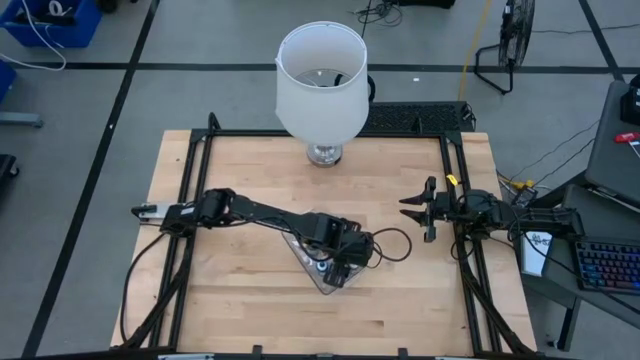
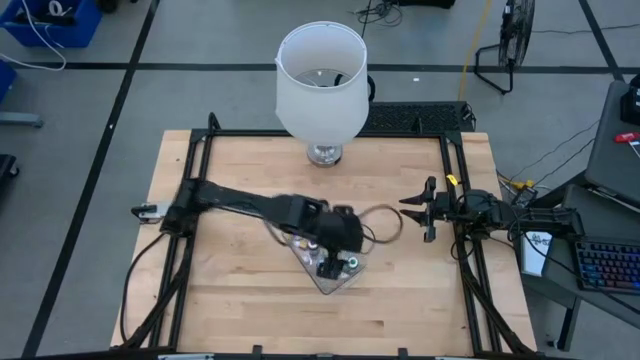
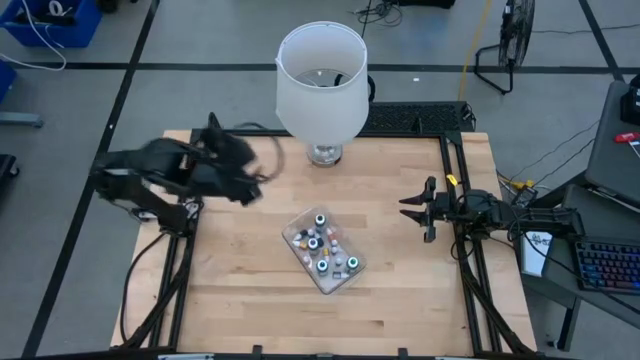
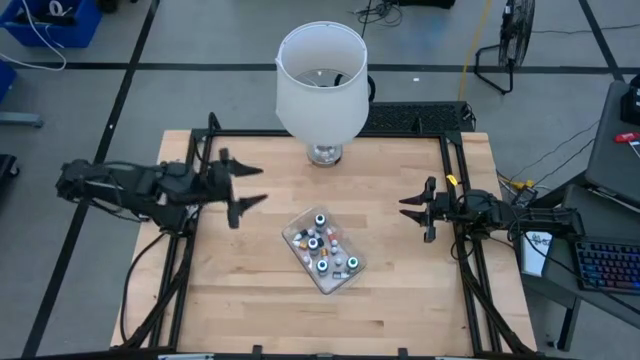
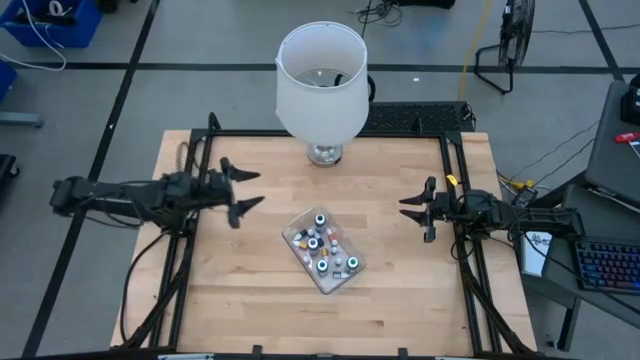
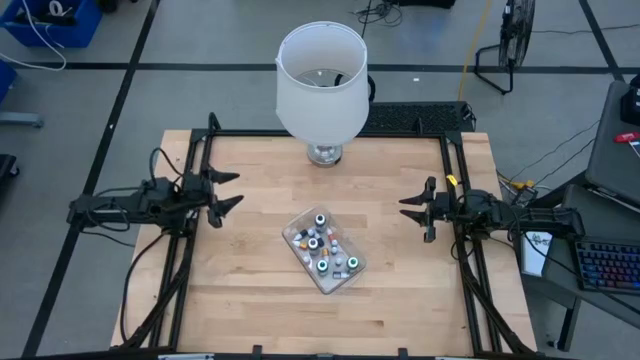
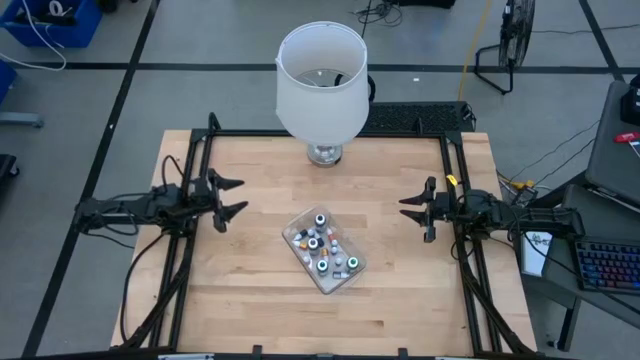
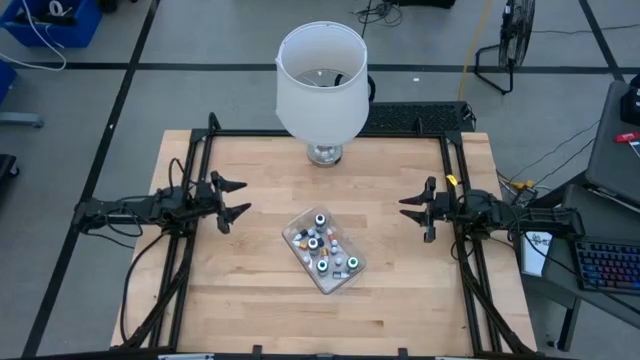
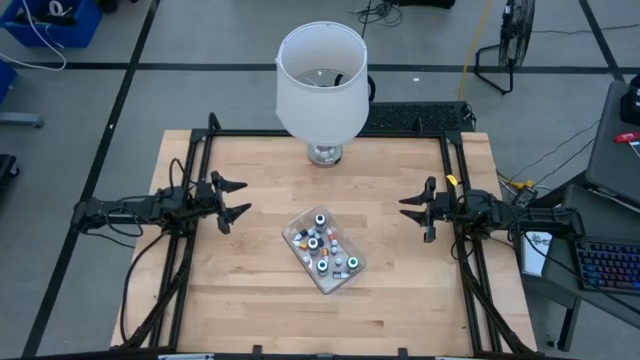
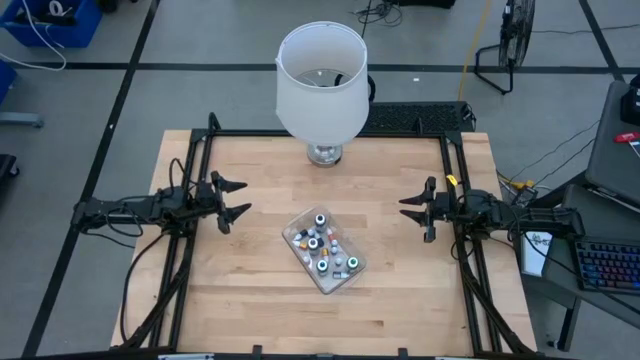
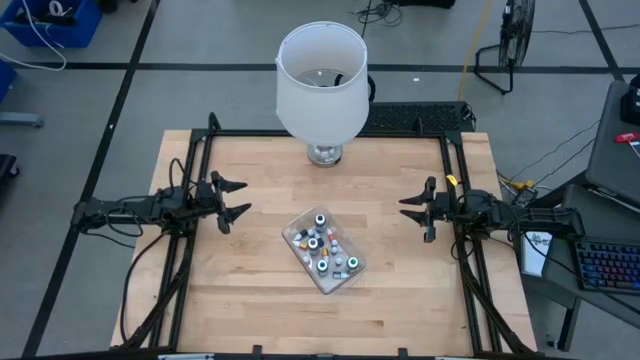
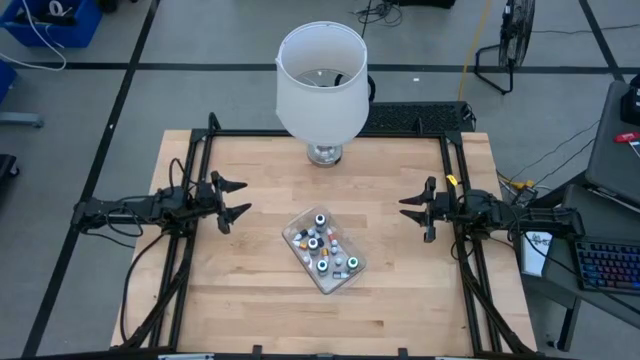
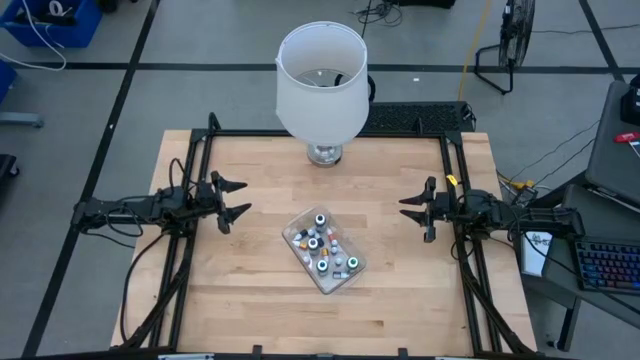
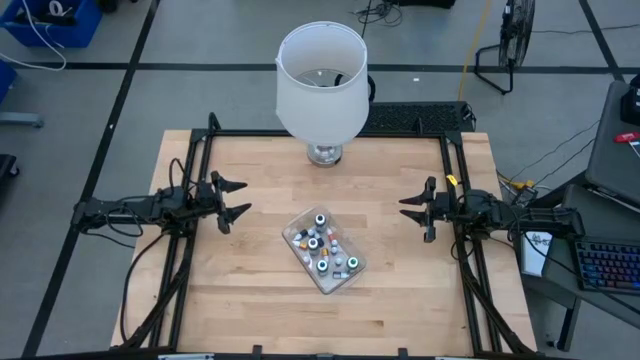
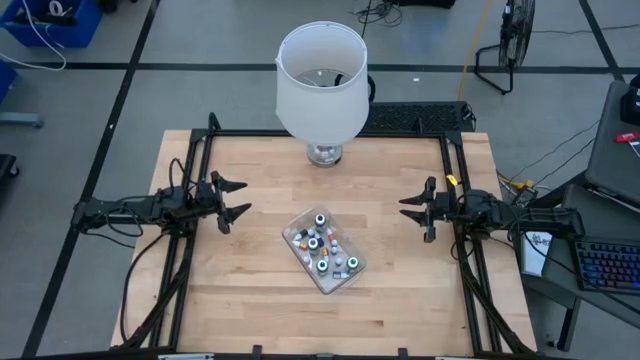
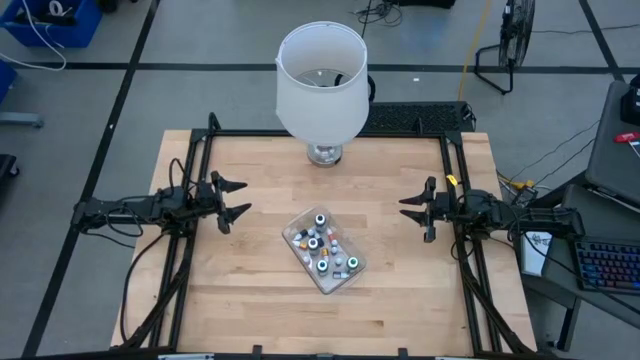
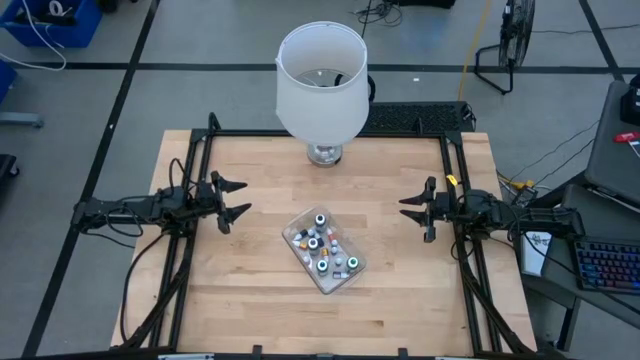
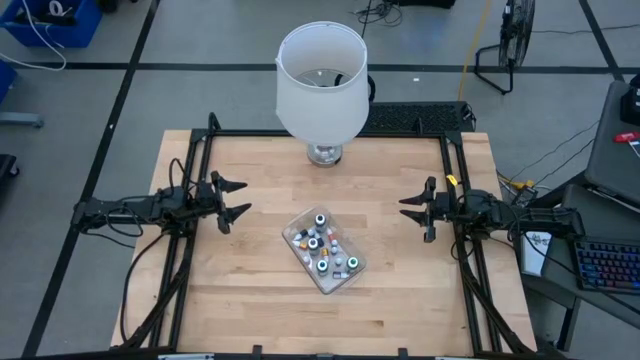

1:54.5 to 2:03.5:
Task: Pick & Place food coloring
Return to Home Position

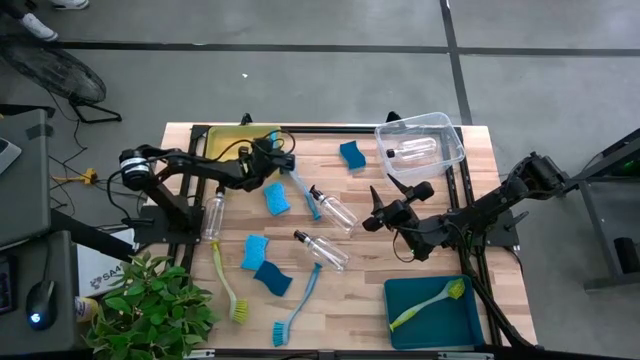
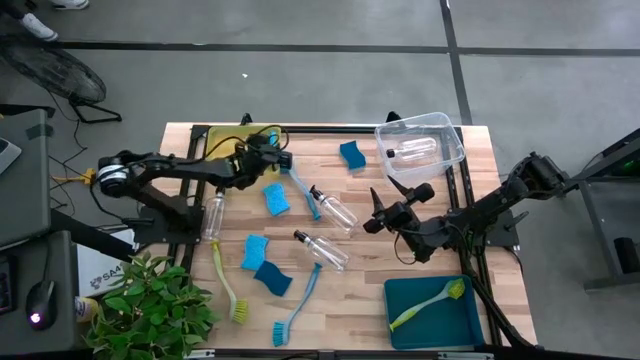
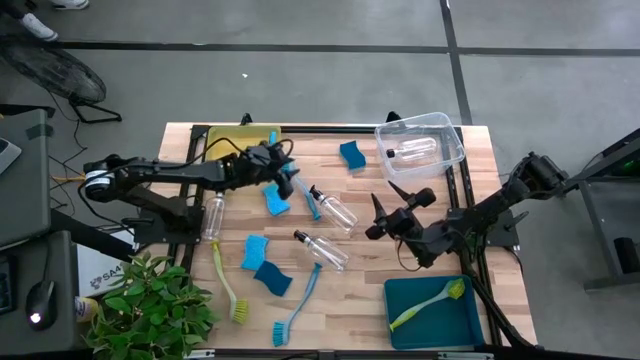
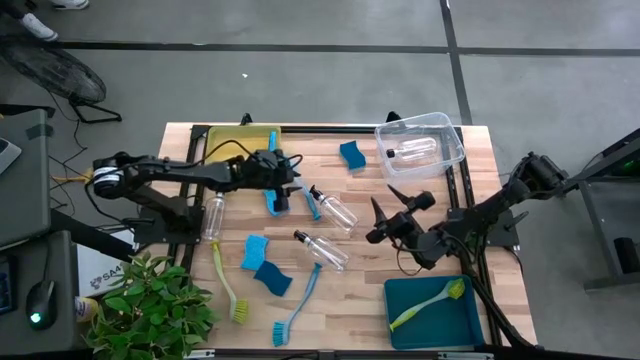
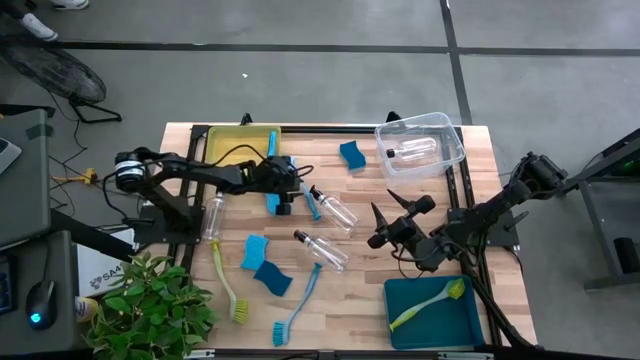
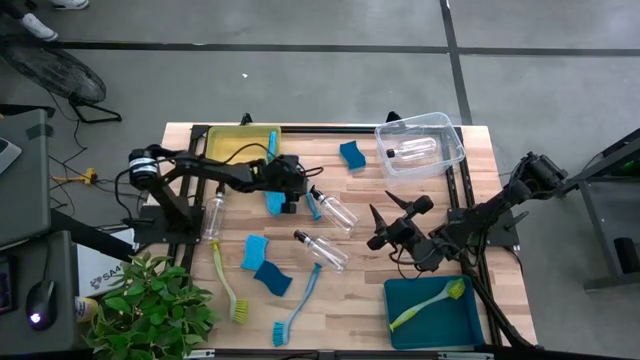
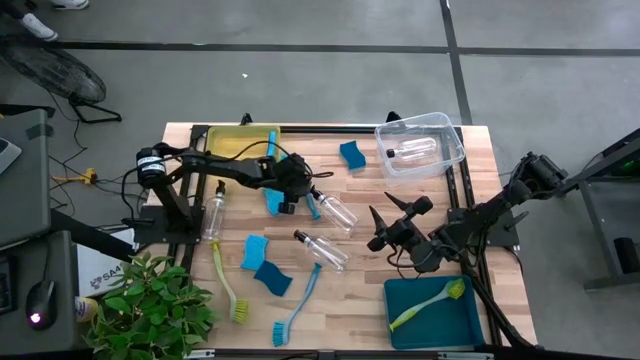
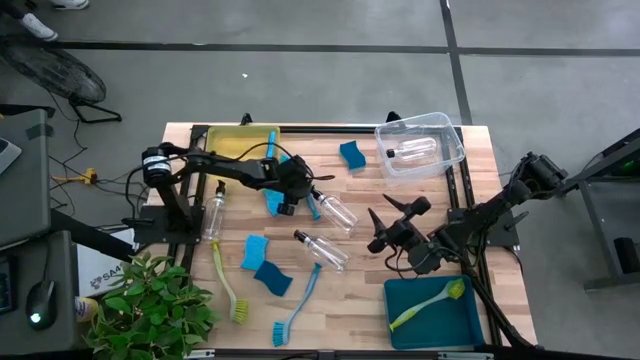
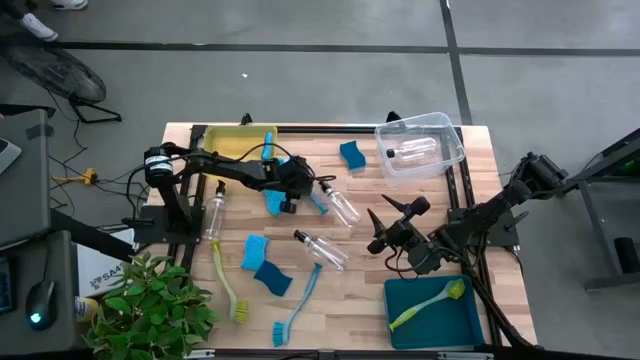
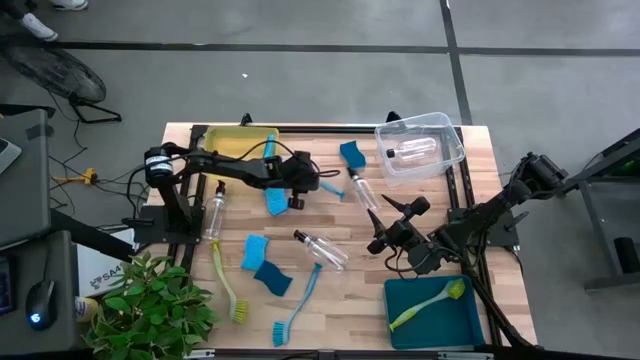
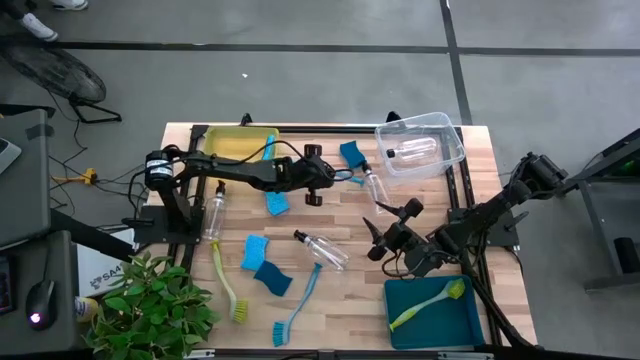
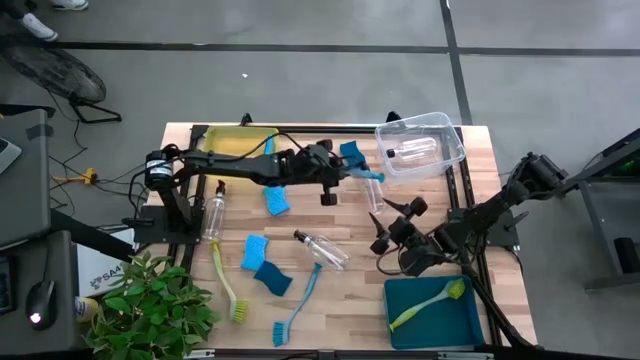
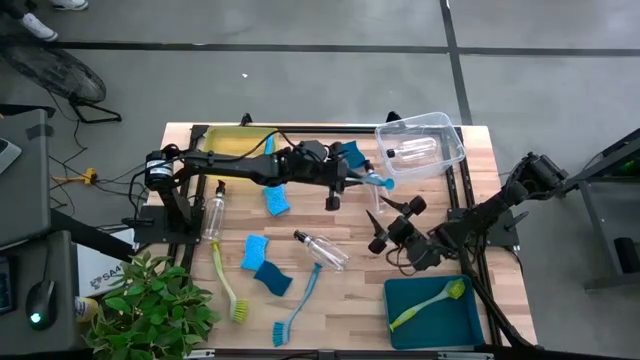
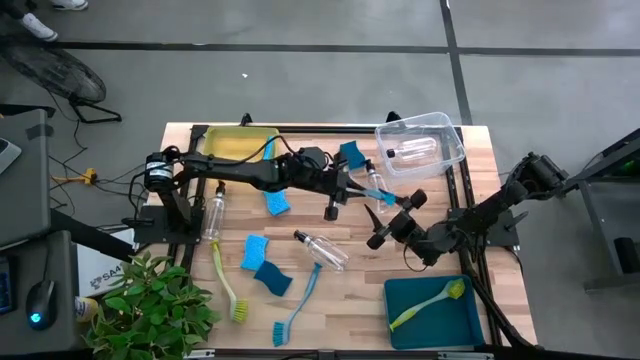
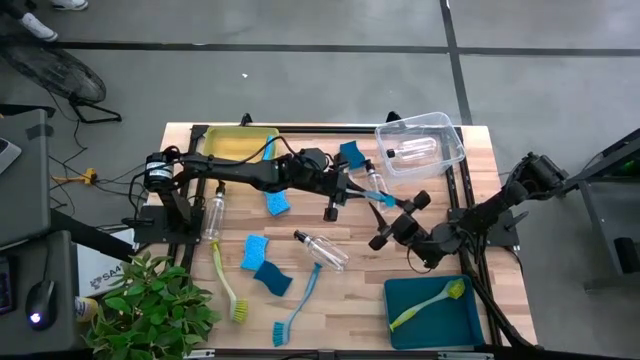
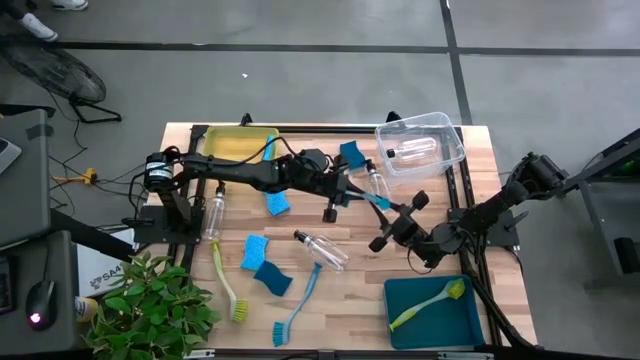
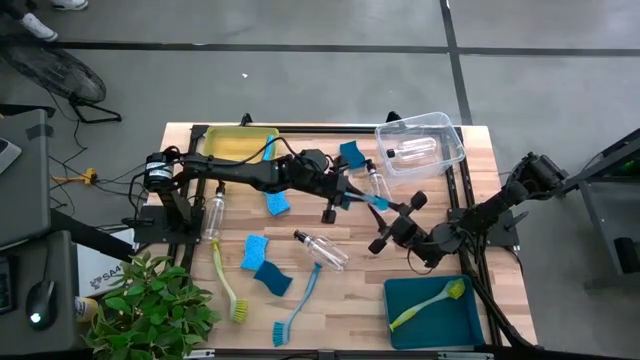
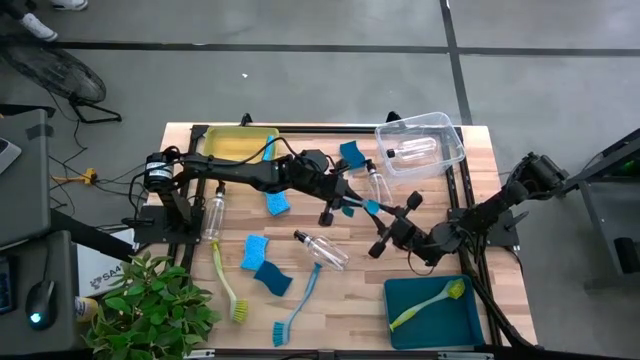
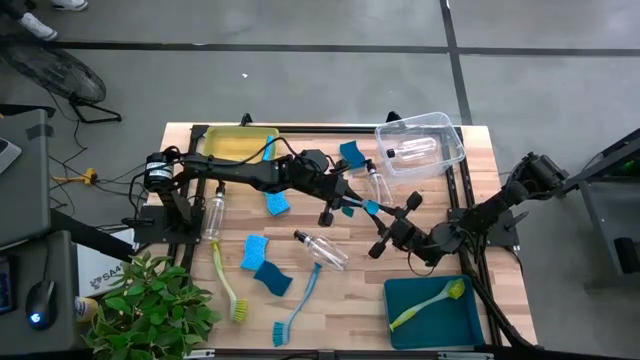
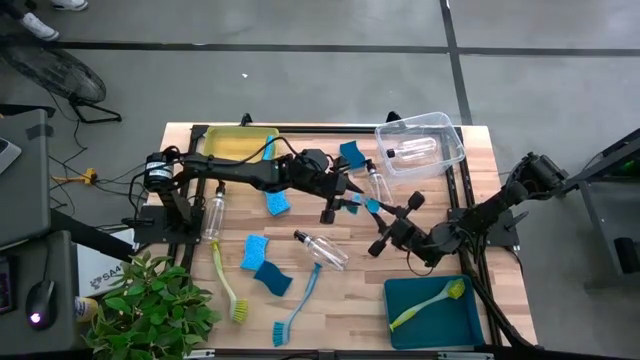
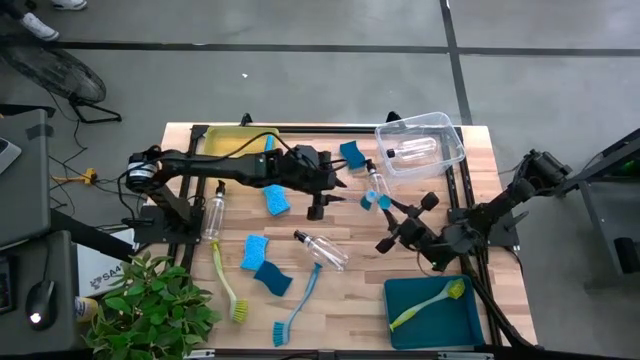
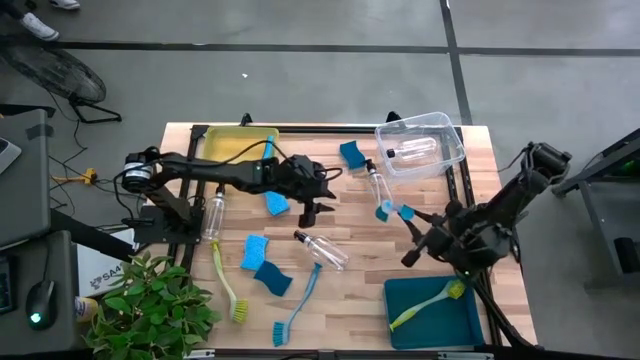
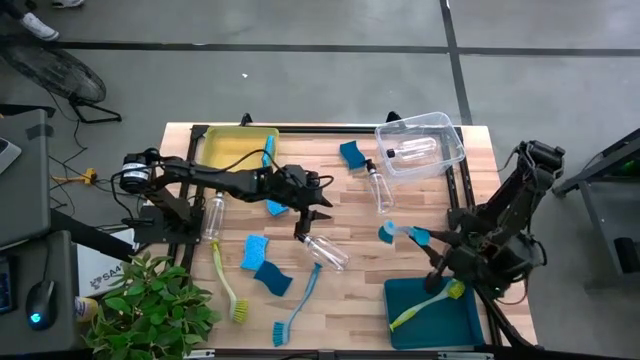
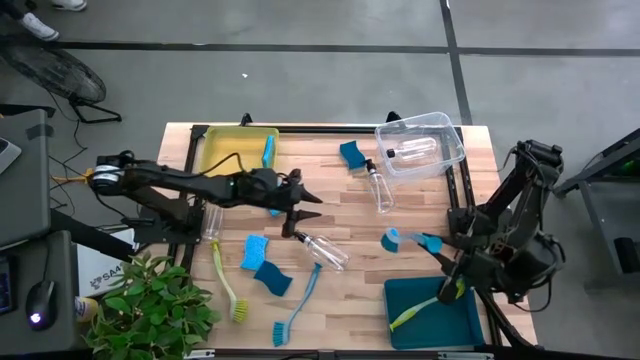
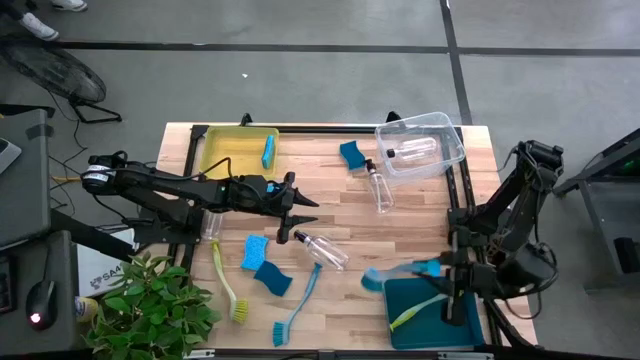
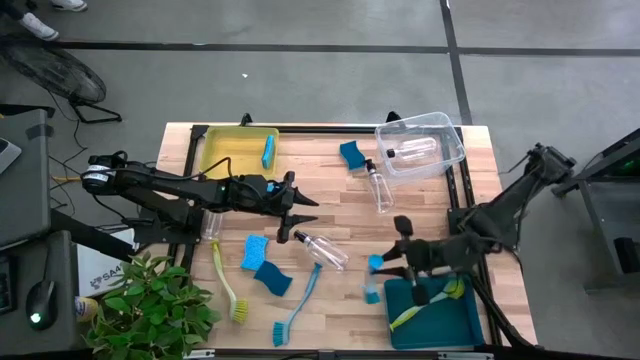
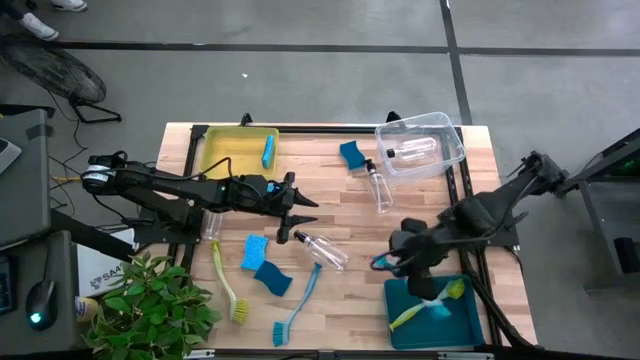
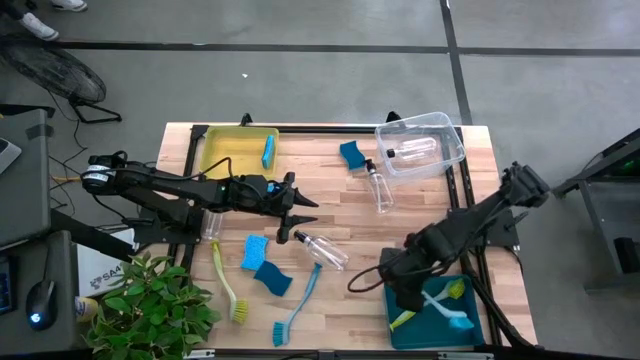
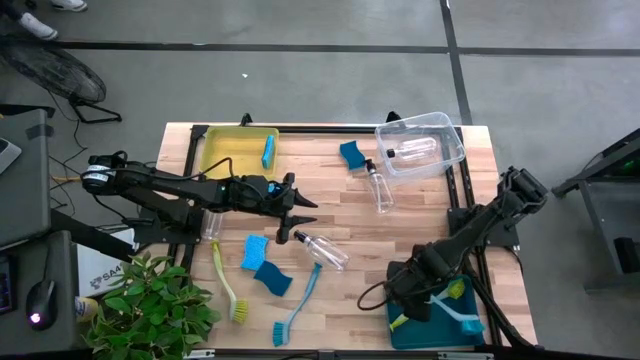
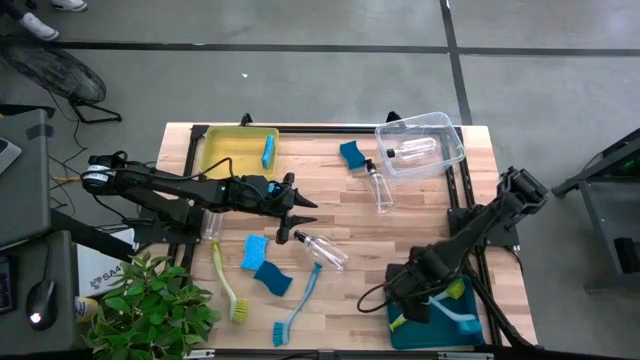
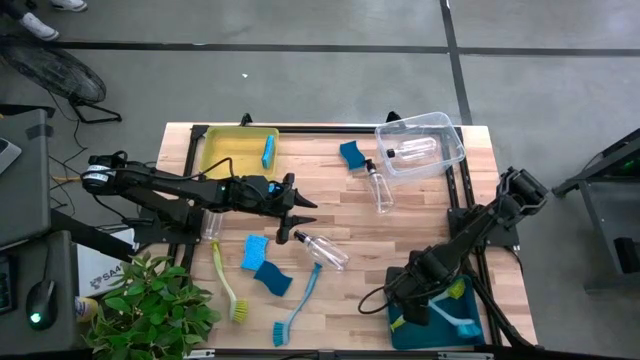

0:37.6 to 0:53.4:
Task: Pick & Place Kitchen Sink Supplies
Put the blue dish brush into the blue bin
